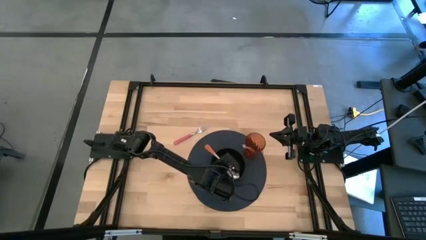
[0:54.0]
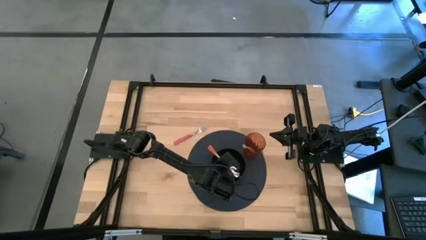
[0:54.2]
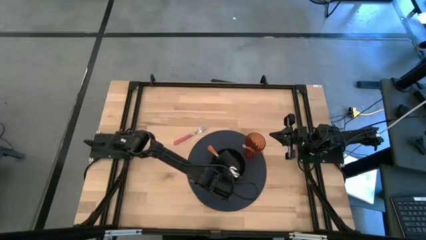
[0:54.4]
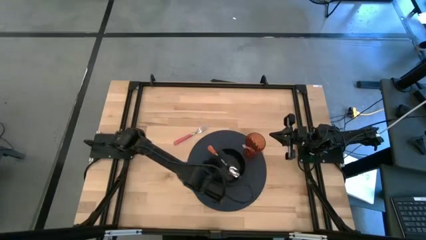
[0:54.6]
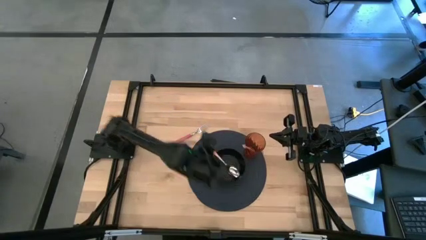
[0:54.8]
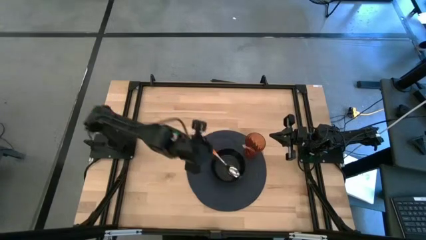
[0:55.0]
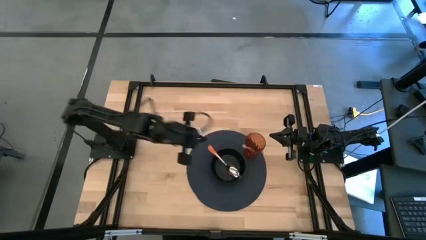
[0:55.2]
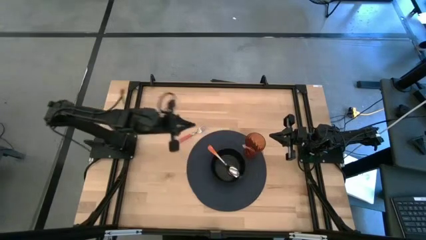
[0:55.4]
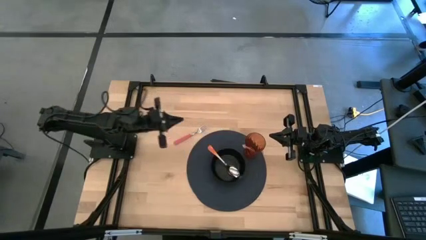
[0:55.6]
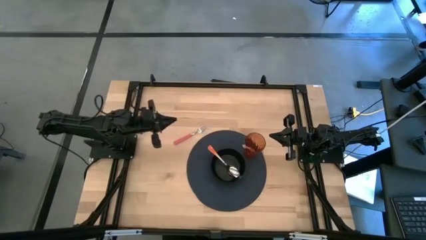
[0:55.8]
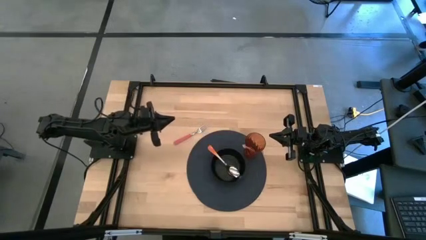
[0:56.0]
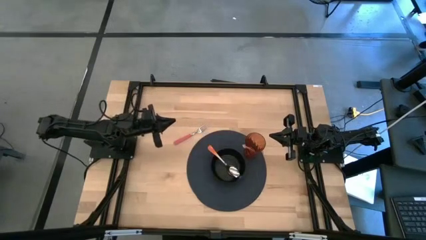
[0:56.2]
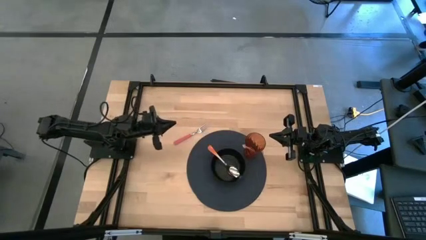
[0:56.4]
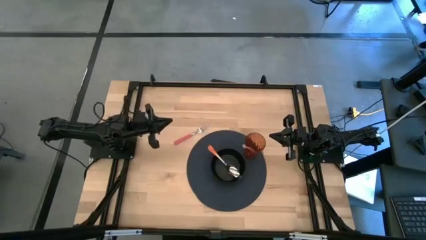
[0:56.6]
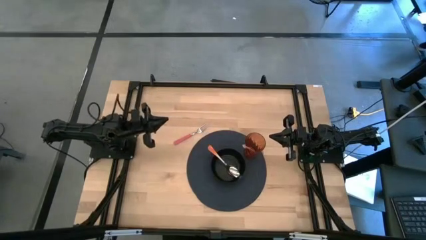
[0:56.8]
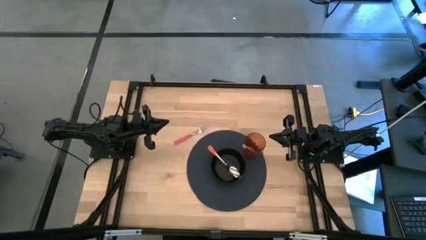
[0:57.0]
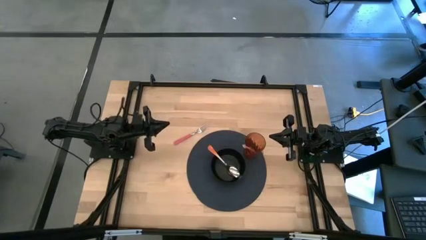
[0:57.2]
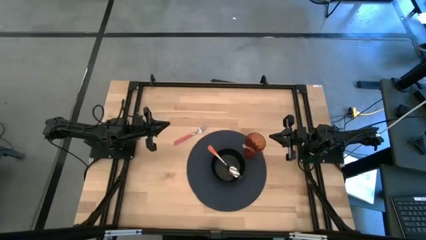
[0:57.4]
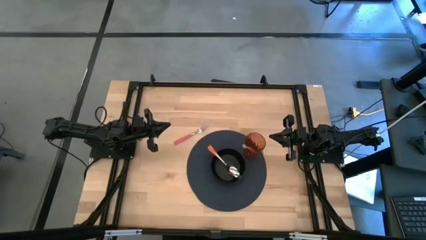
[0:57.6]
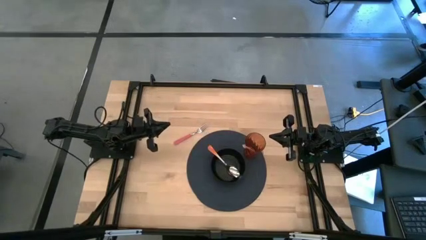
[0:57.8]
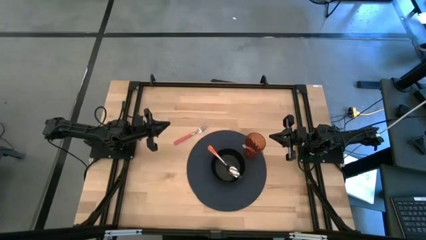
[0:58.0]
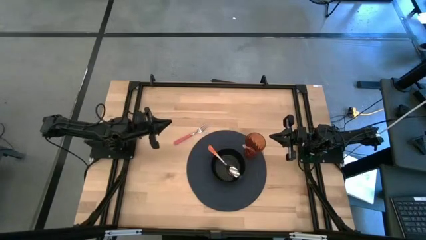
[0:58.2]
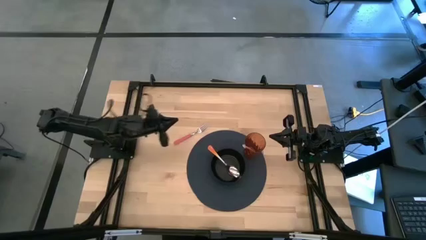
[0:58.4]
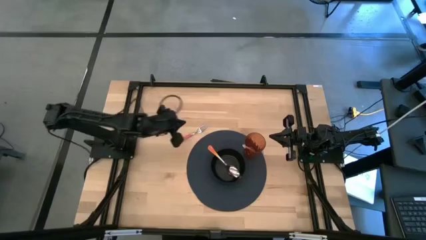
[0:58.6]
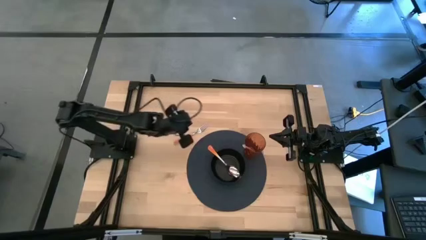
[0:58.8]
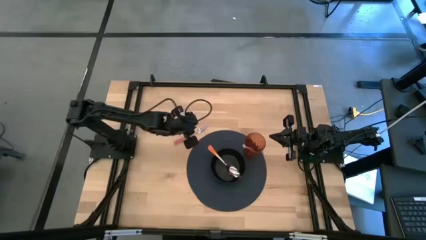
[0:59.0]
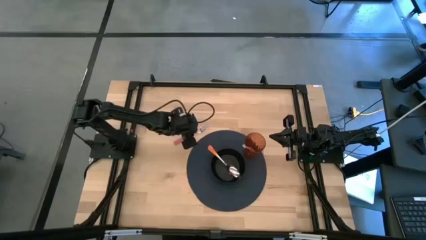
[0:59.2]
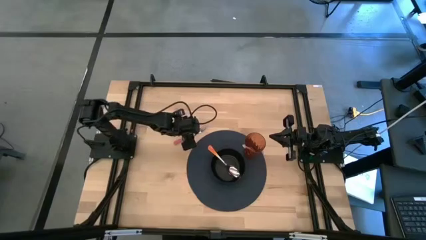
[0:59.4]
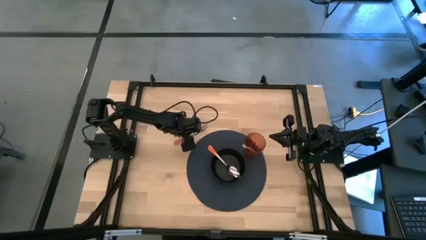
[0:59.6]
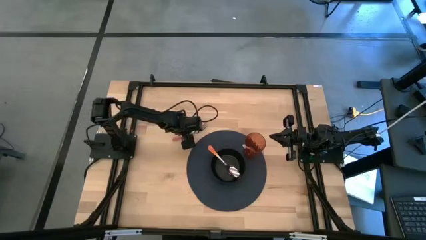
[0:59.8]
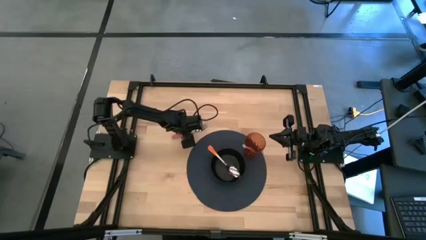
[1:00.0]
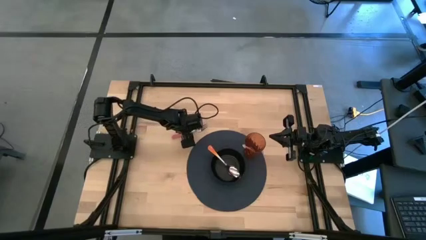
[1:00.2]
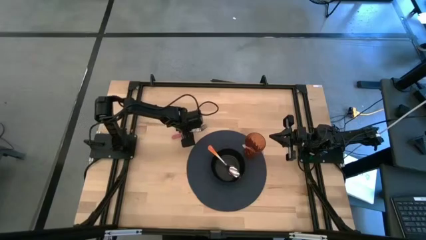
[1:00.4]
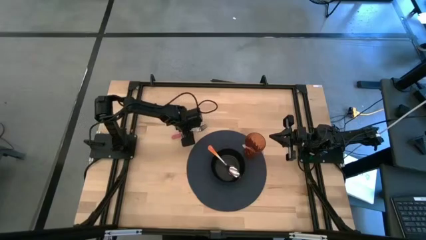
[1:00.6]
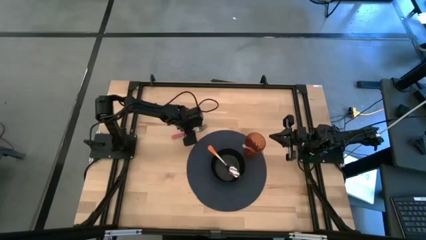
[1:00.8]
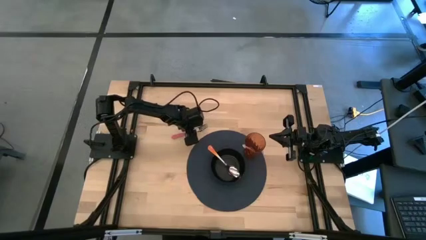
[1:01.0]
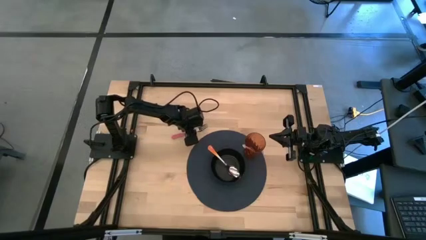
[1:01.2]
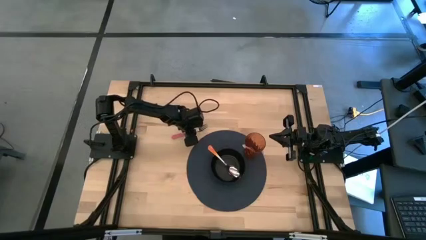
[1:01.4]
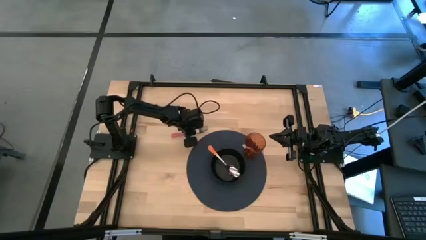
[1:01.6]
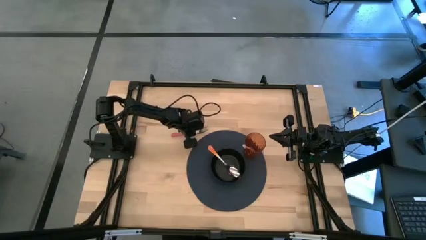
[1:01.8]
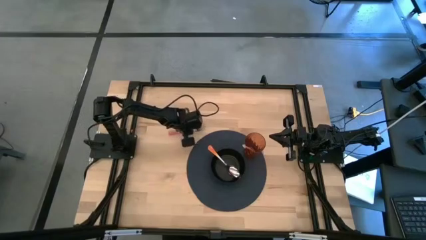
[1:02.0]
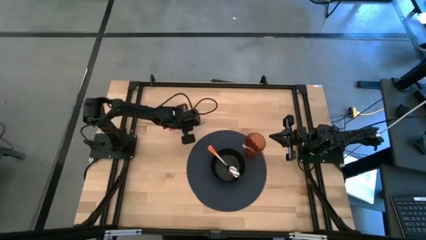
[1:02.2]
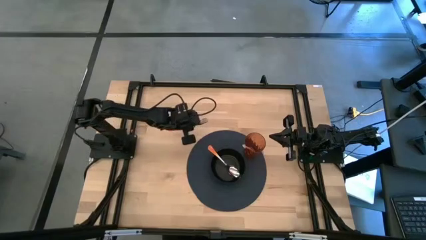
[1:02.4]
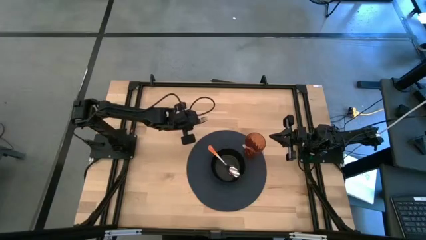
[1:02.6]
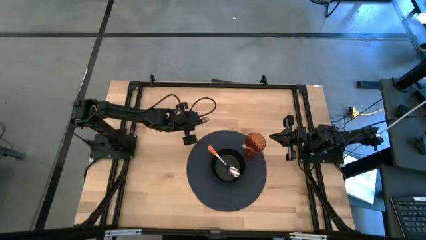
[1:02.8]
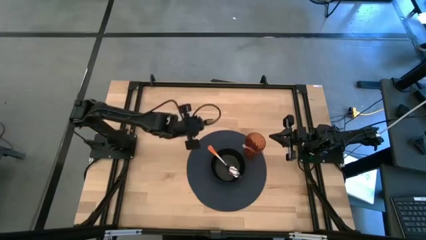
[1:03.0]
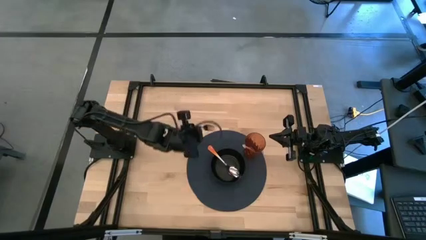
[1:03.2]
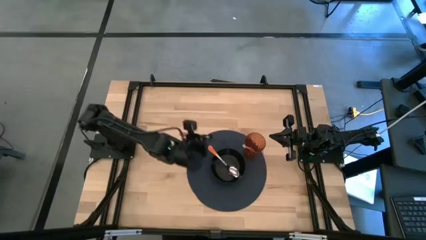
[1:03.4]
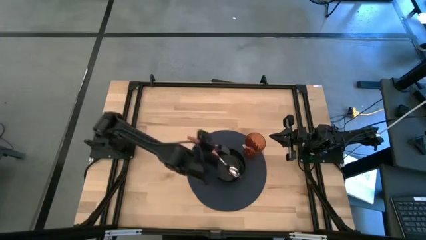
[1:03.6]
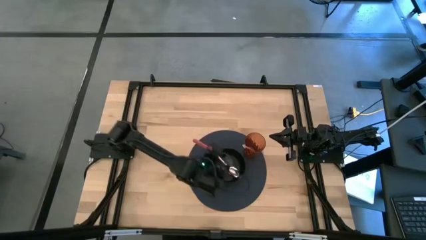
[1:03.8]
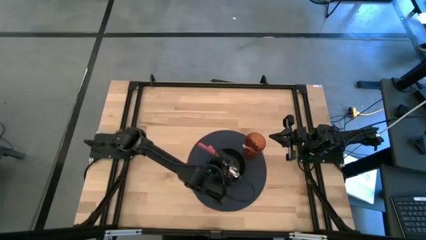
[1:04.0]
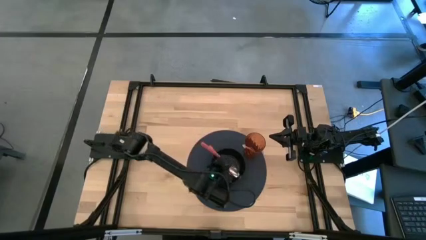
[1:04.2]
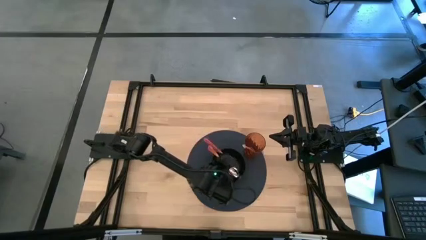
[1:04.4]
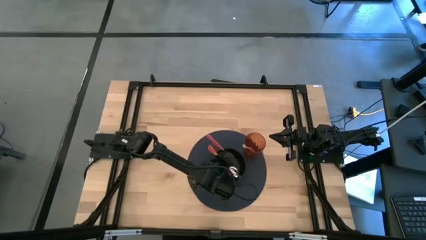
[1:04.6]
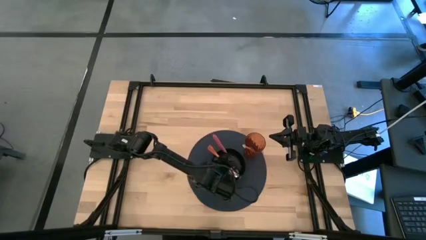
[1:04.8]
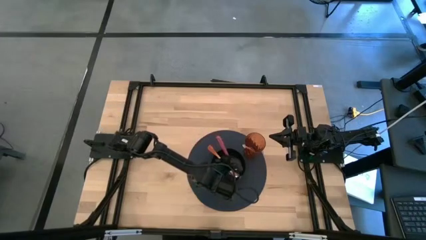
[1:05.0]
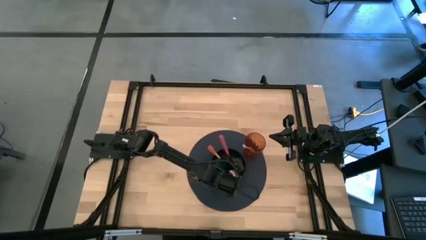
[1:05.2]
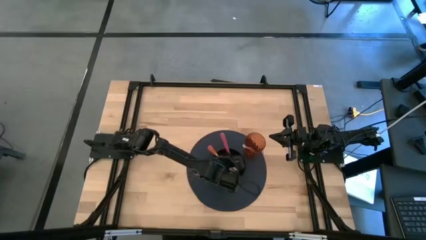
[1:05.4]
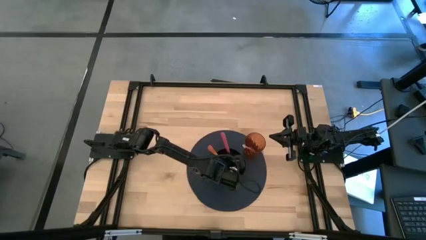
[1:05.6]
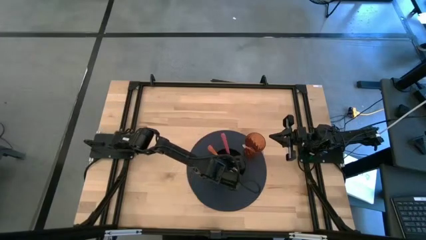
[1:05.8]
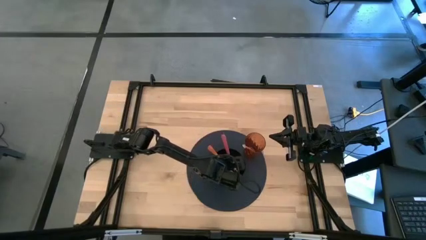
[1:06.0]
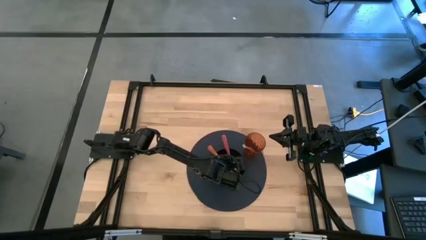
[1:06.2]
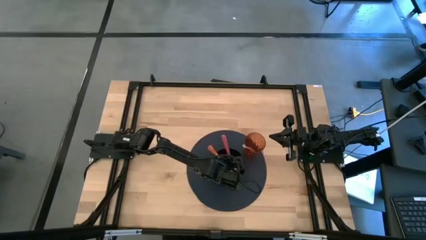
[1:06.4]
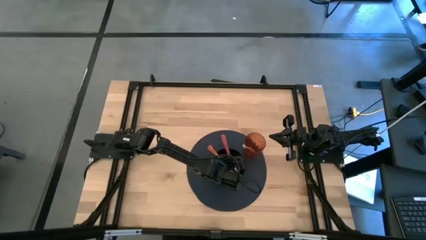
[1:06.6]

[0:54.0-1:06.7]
Task: Pick & Place Utensil
Put the pink fork into the black bowl
